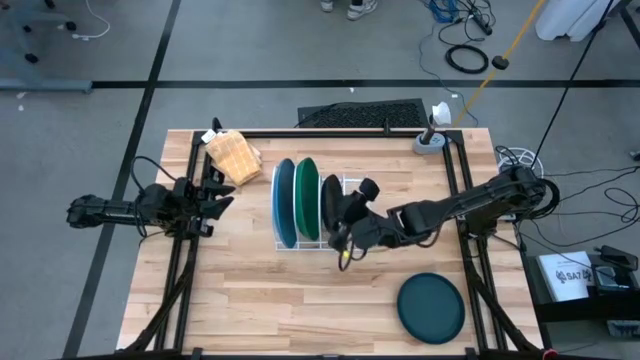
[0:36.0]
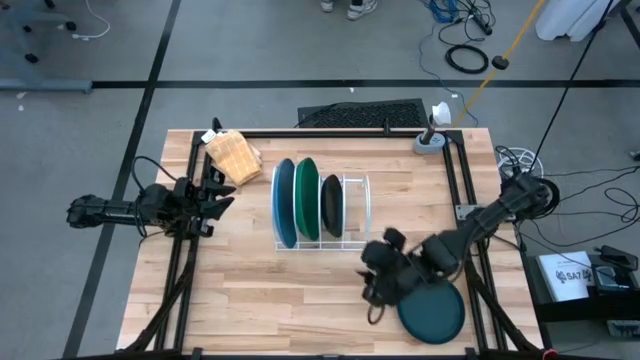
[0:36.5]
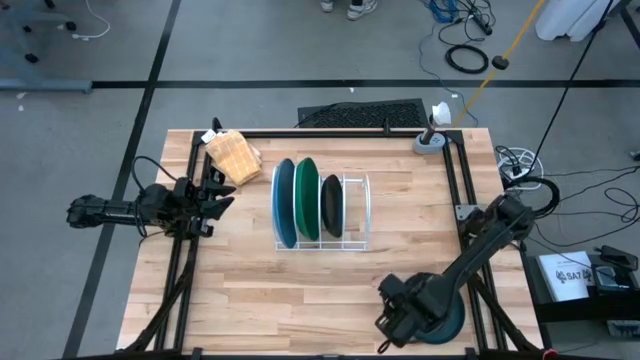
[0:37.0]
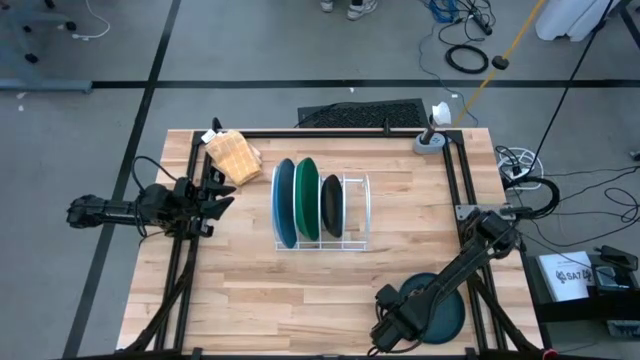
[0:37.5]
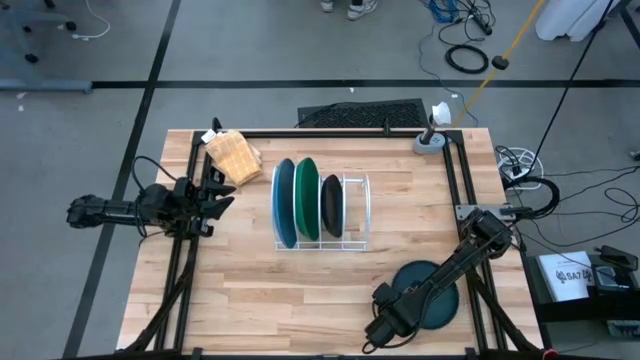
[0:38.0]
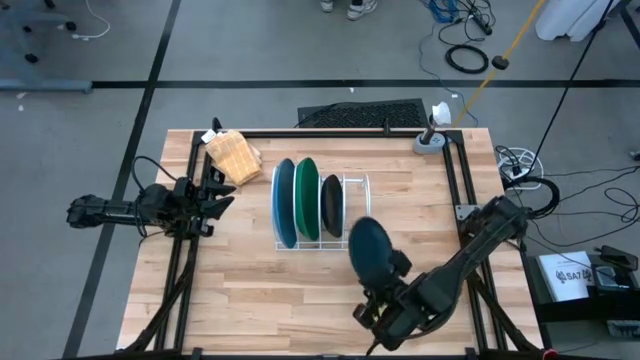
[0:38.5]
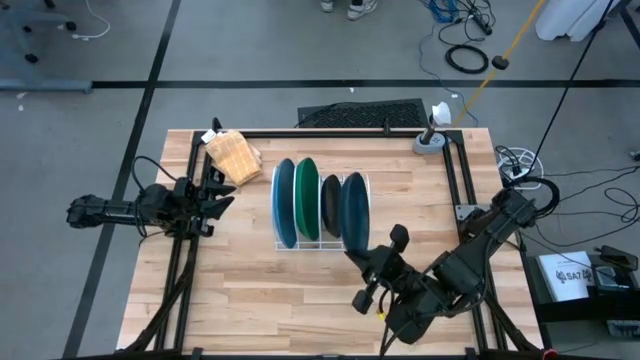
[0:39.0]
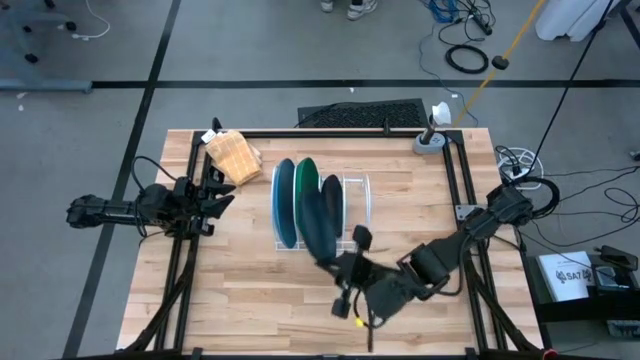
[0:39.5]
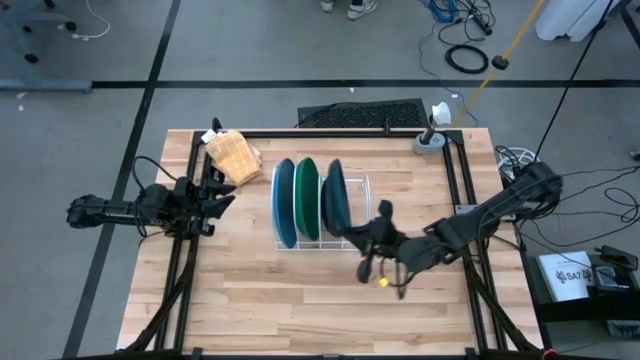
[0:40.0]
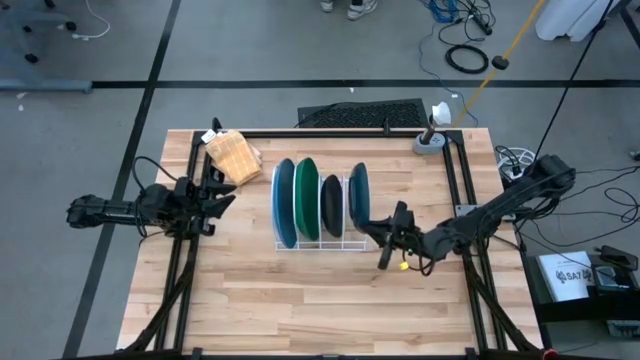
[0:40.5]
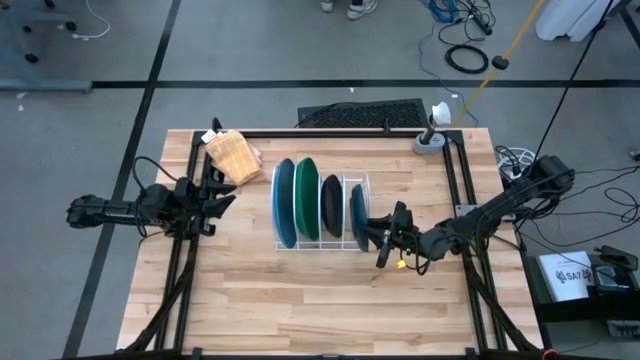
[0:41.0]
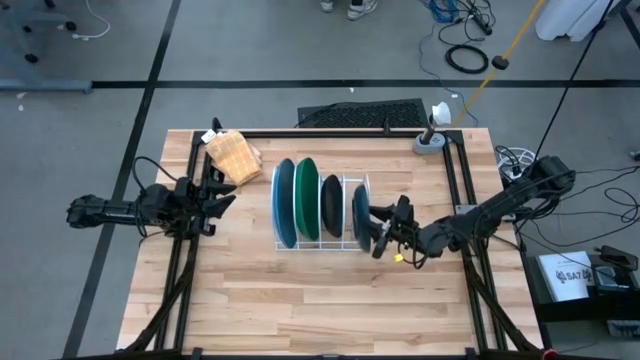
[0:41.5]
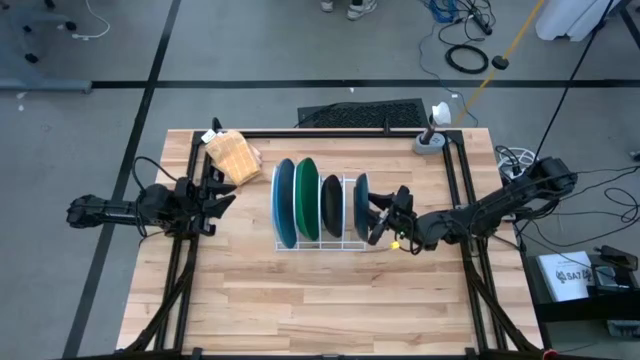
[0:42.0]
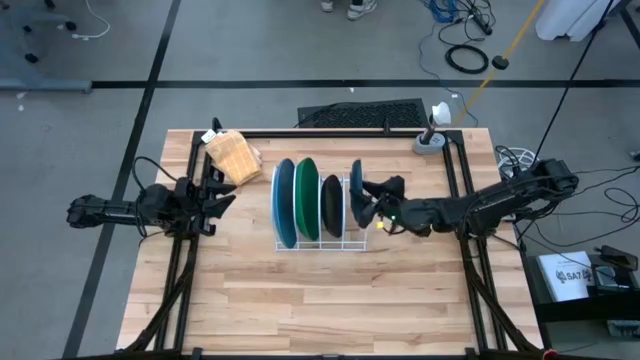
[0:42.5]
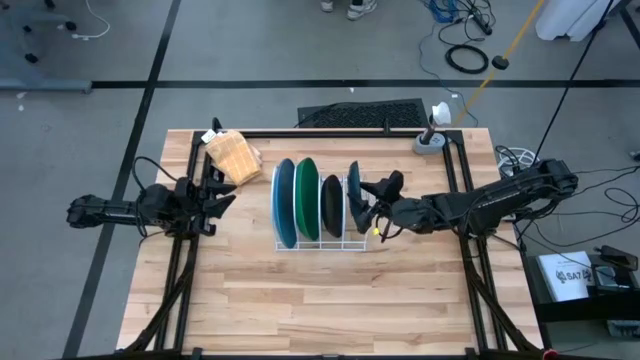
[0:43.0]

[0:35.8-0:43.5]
Task: Sort dishes
Put the dark blue plate in the dishwasher rack

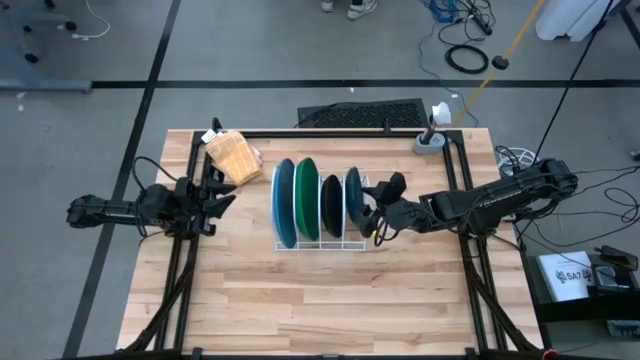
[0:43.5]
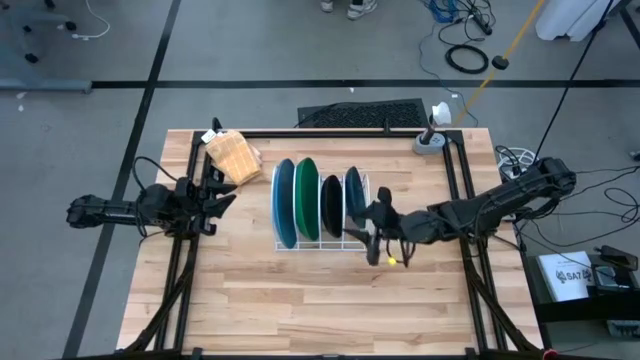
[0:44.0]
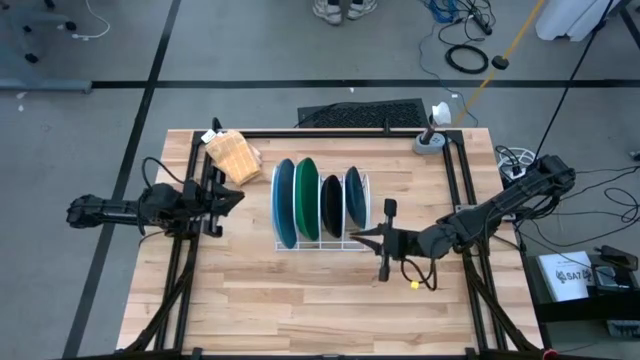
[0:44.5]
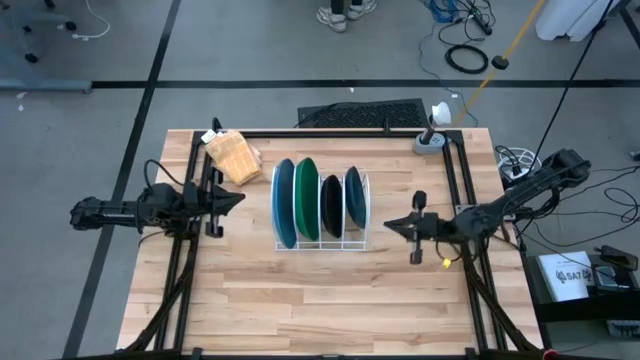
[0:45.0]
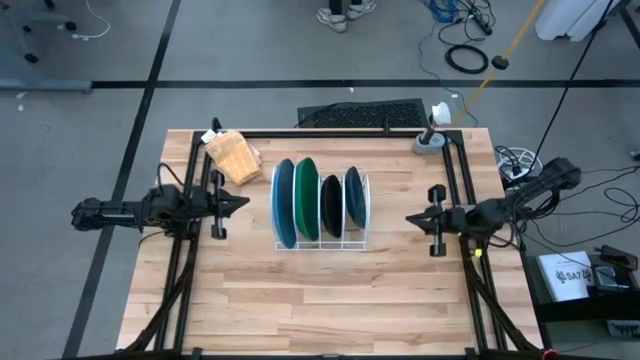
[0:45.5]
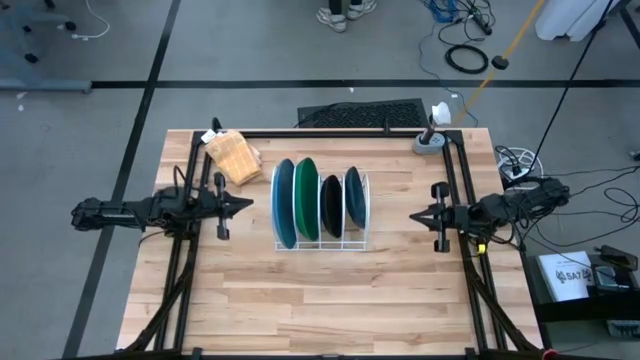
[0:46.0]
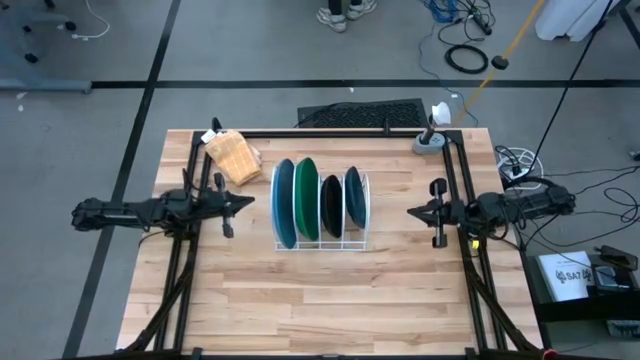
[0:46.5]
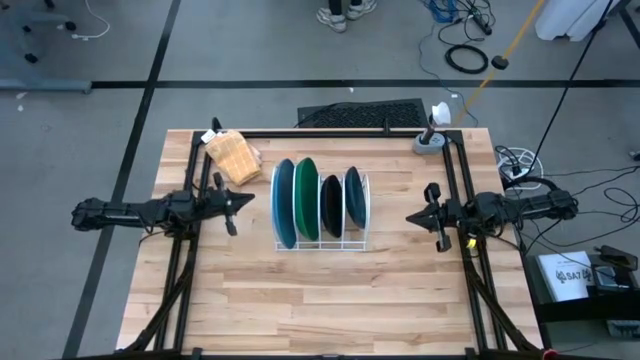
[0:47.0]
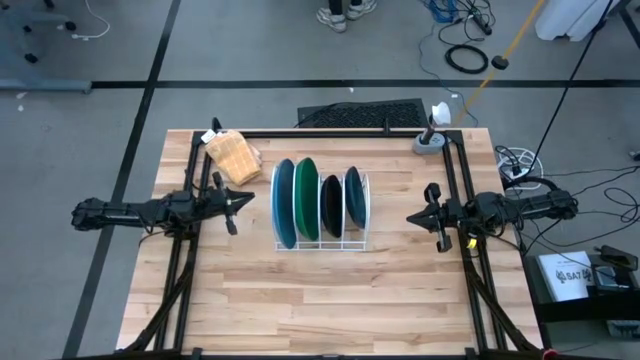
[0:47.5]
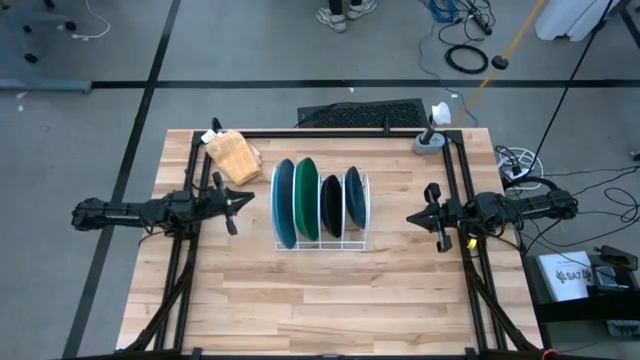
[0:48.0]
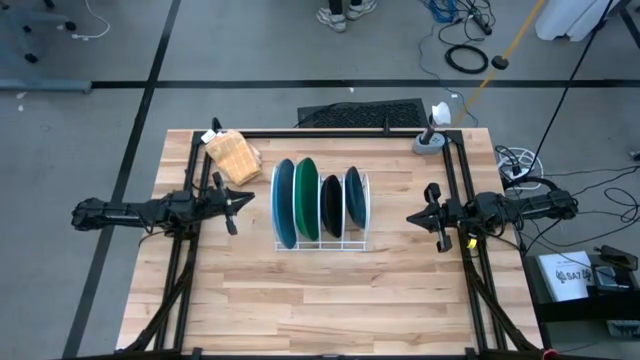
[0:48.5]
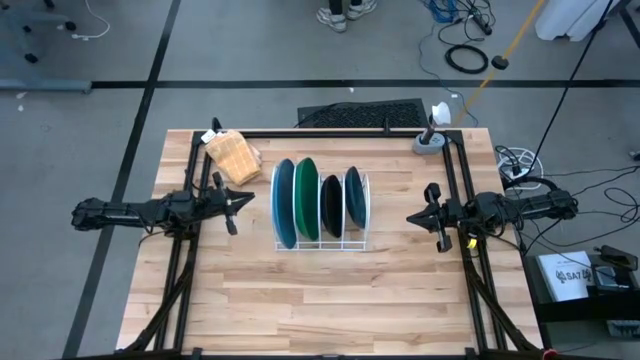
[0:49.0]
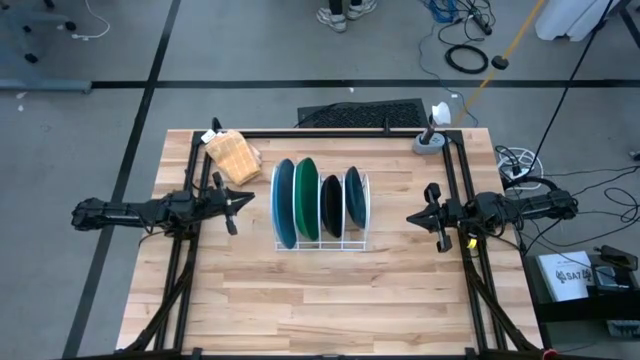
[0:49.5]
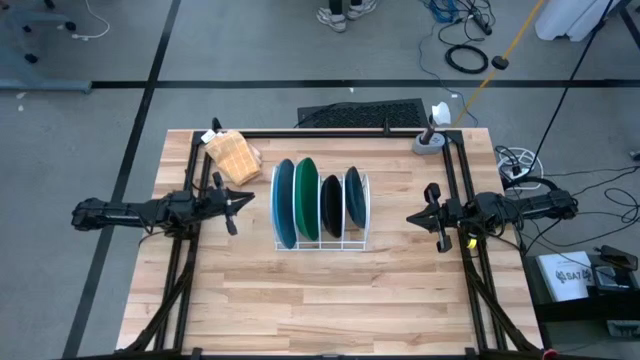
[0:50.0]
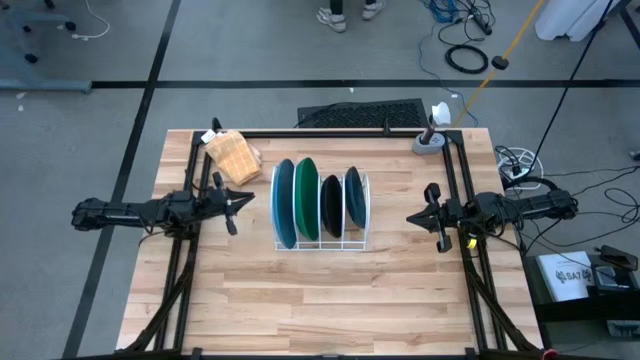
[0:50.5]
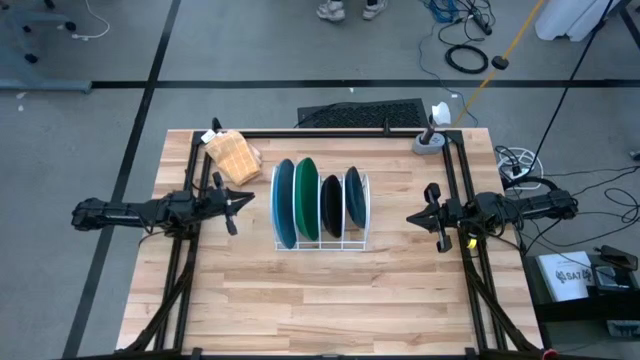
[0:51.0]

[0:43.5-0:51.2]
Return to Home Position

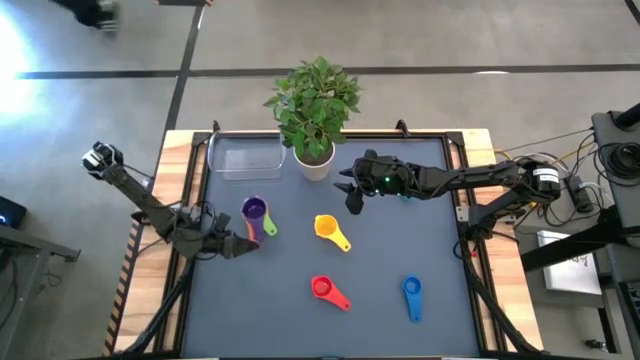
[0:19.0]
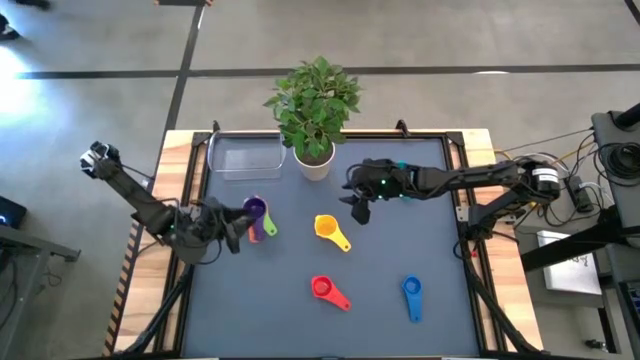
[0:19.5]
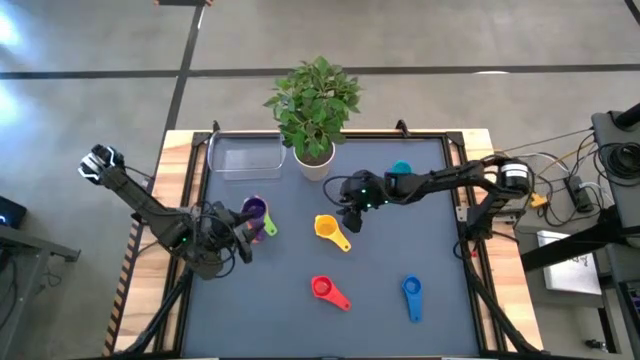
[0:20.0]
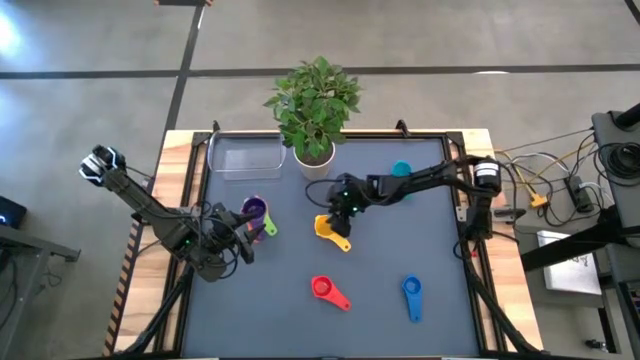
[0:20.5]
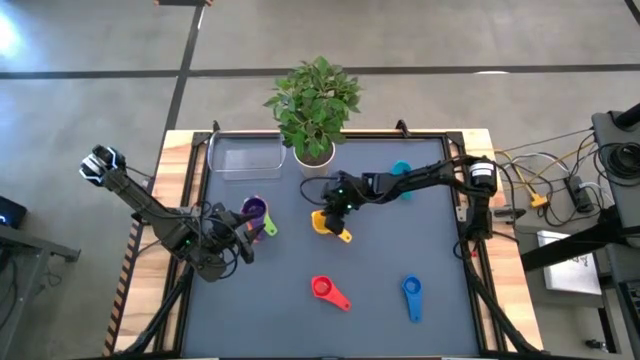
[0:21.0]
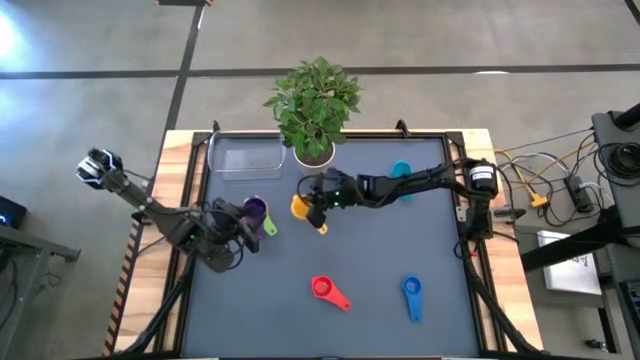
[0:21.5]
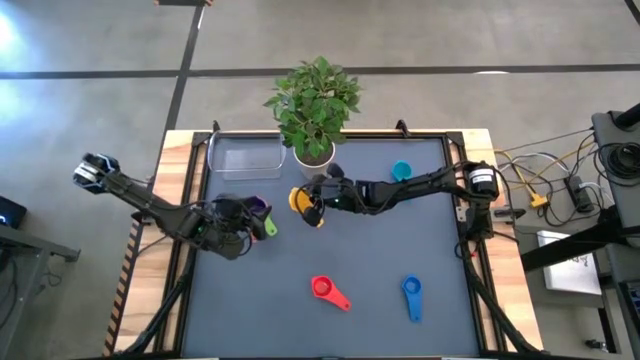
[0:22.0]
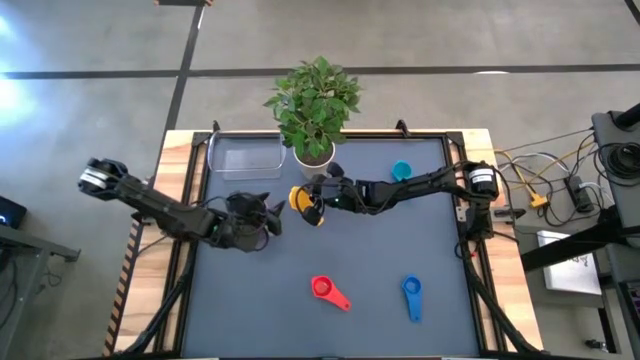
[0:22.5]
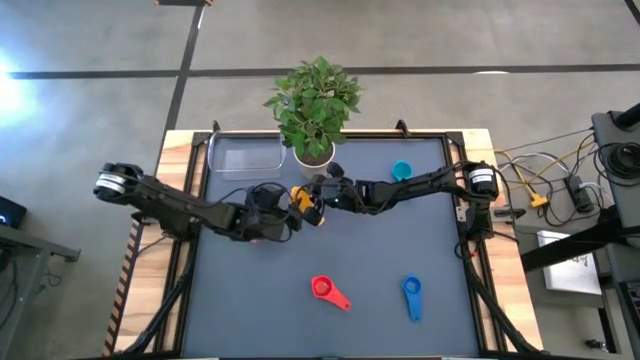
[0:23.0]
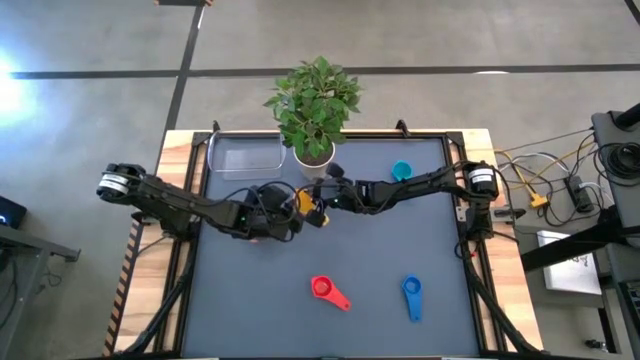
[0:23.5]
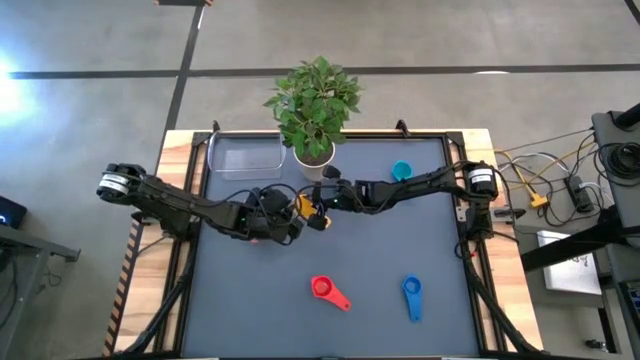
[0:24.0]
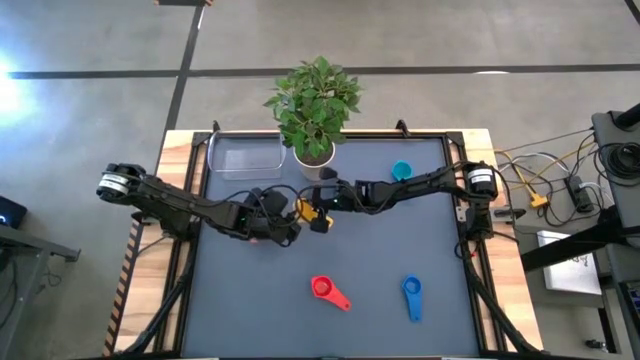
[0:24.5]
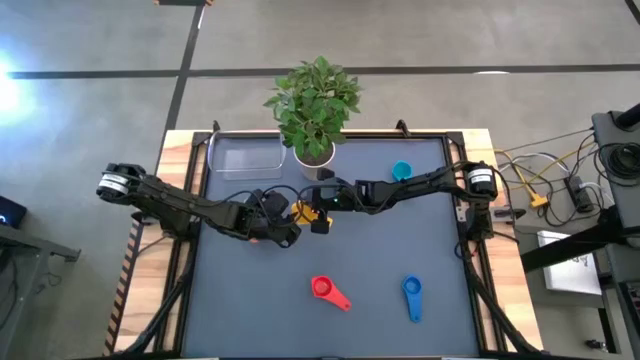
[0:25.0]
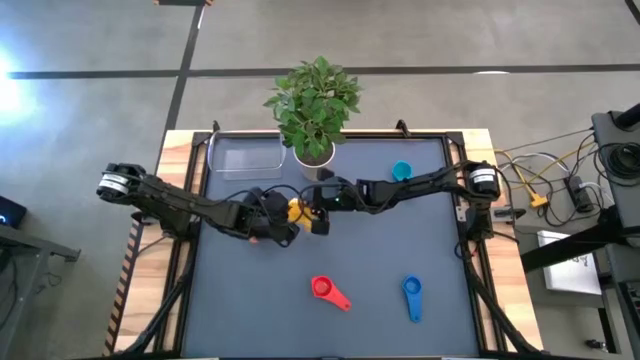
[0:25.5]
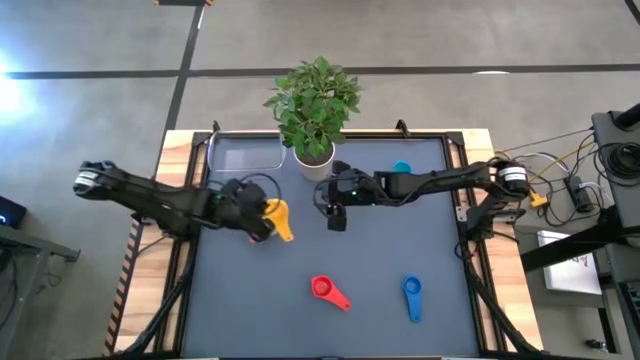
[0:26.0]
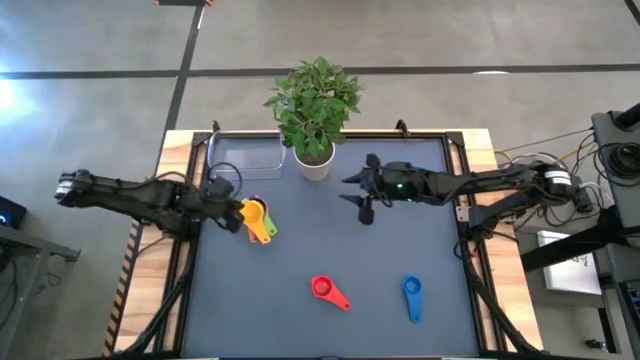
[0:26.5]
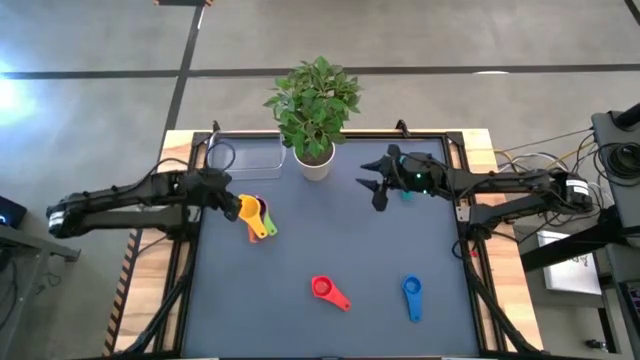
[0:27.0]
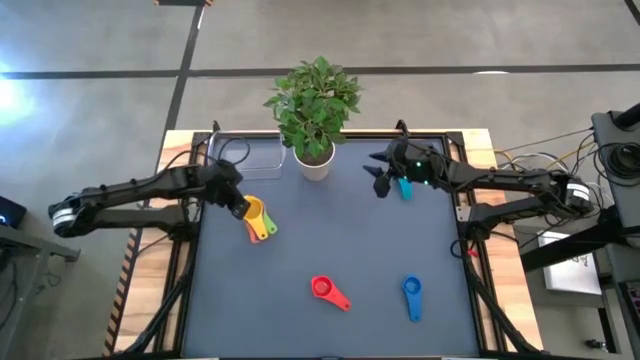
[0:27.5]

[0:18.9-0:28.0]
Task: Nest measuring cups in basket
Stack the yellow measuring cup on top of the violet measuring cup
